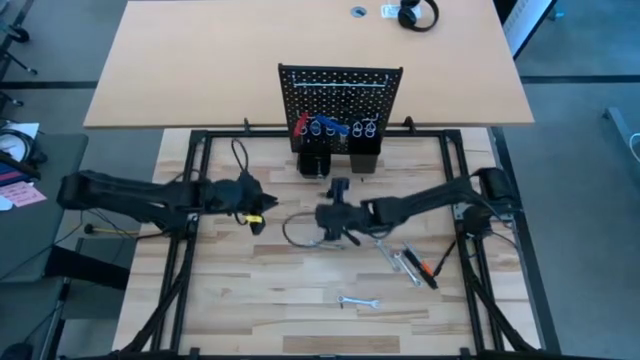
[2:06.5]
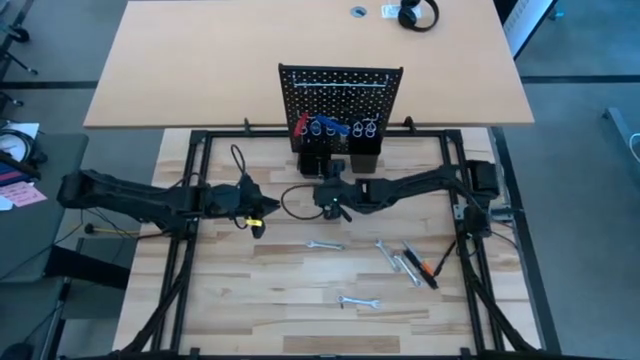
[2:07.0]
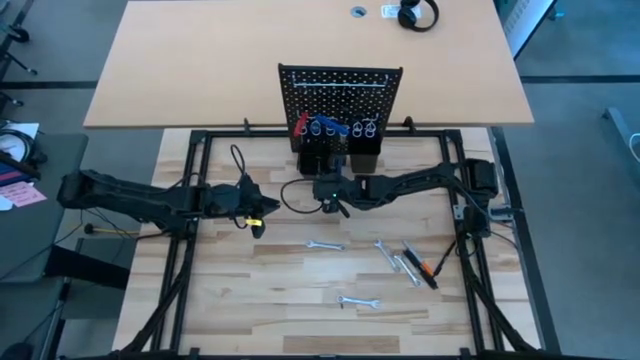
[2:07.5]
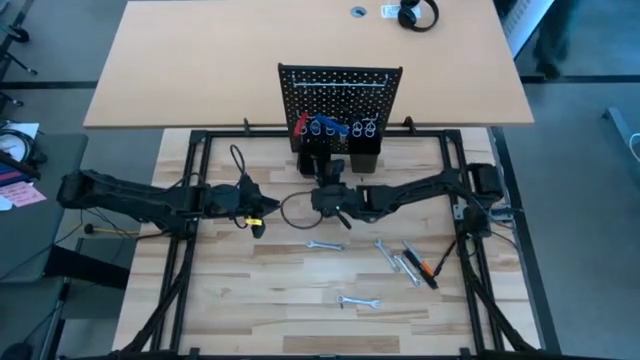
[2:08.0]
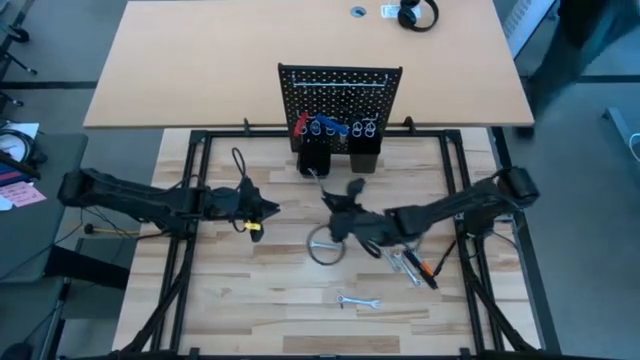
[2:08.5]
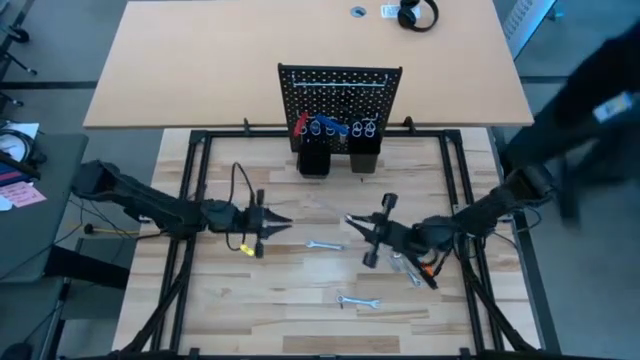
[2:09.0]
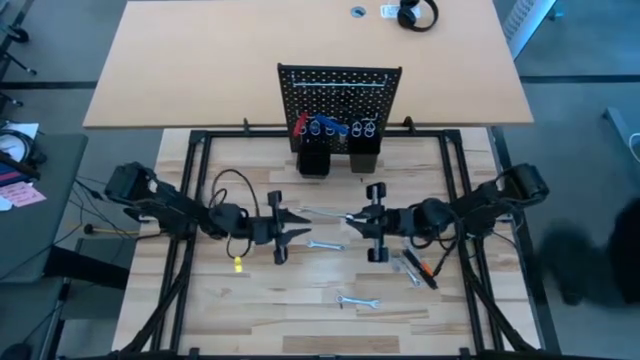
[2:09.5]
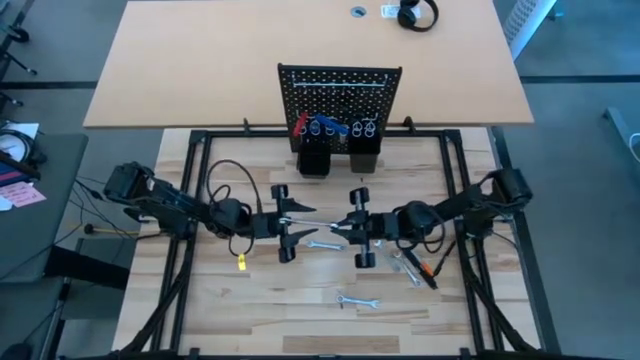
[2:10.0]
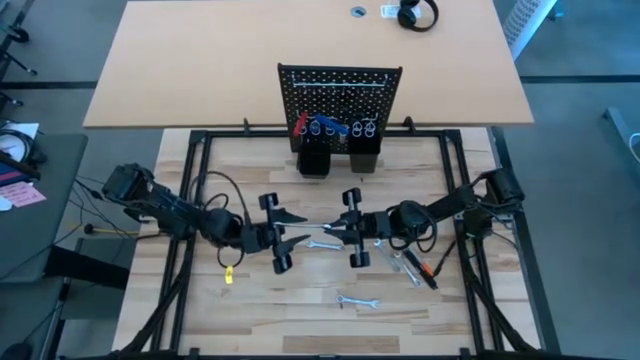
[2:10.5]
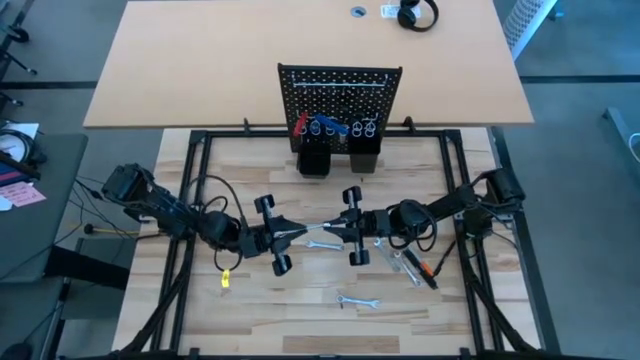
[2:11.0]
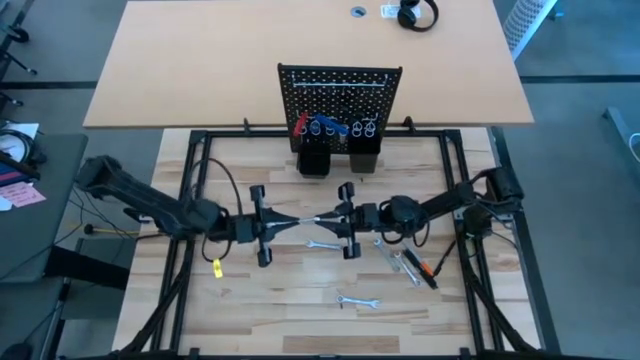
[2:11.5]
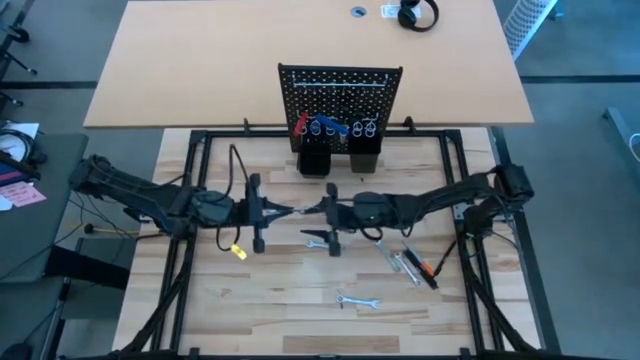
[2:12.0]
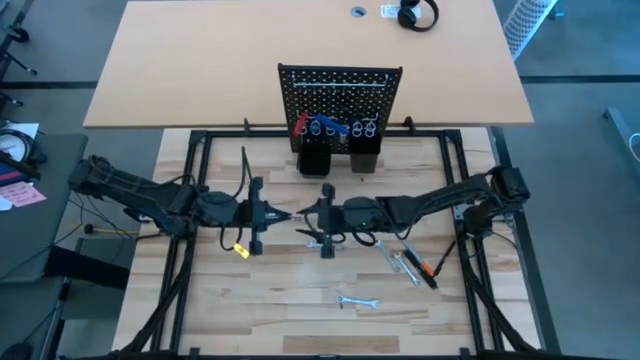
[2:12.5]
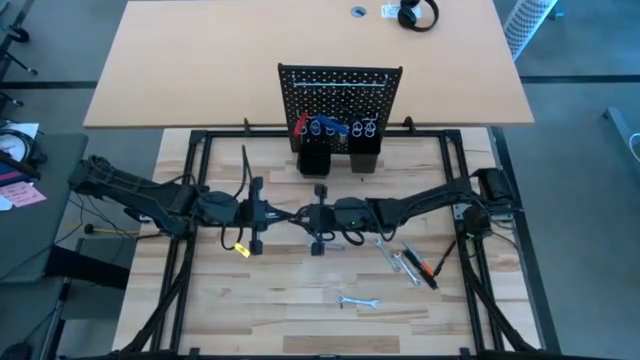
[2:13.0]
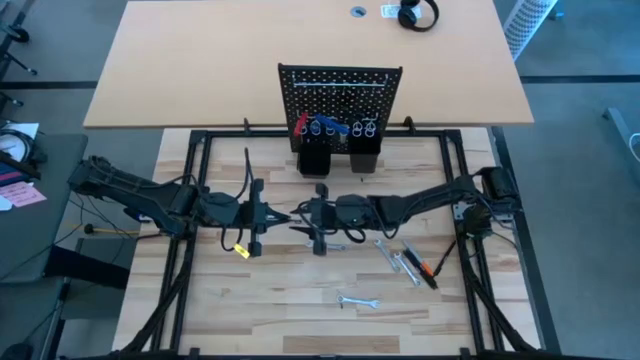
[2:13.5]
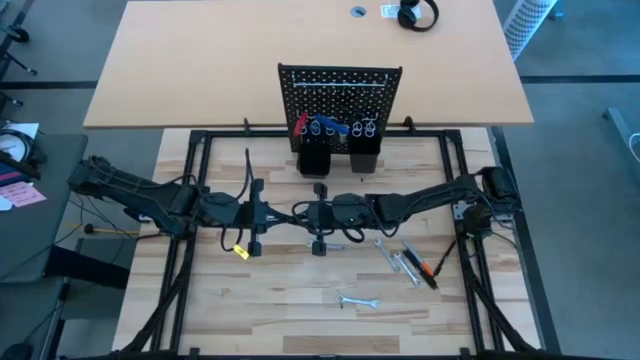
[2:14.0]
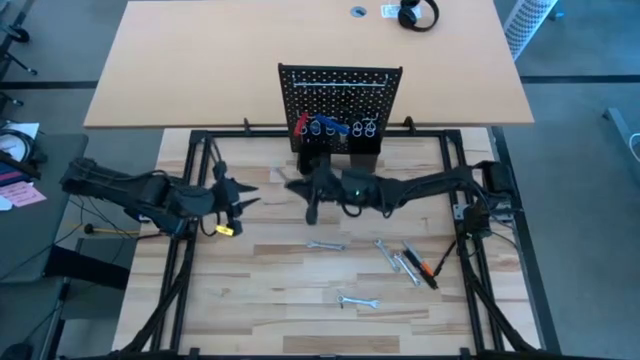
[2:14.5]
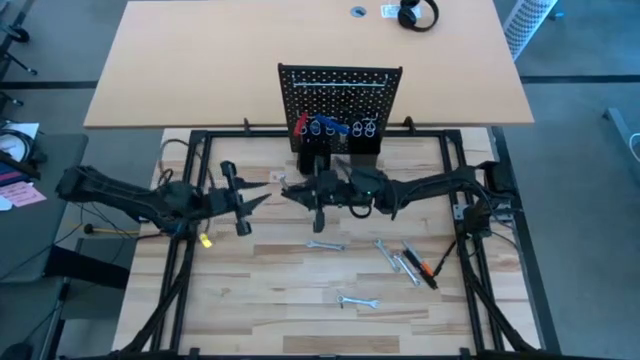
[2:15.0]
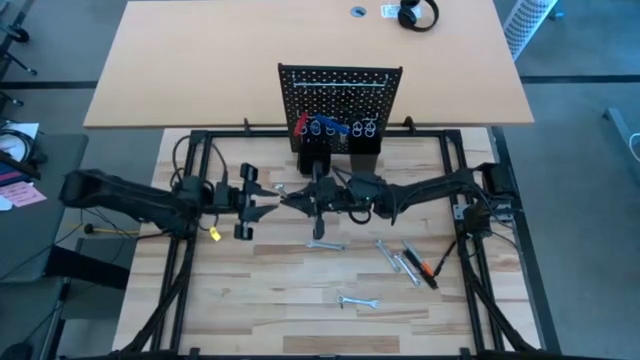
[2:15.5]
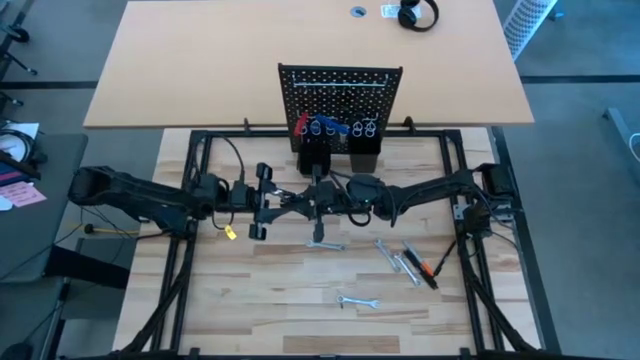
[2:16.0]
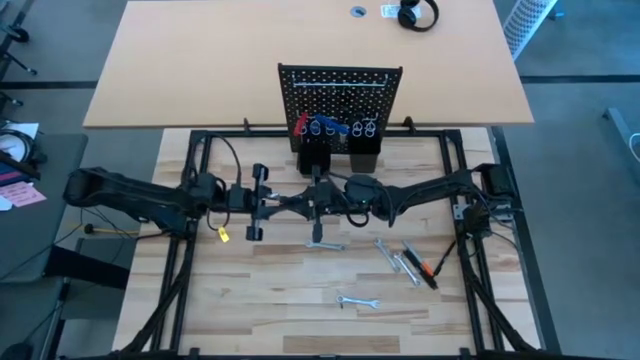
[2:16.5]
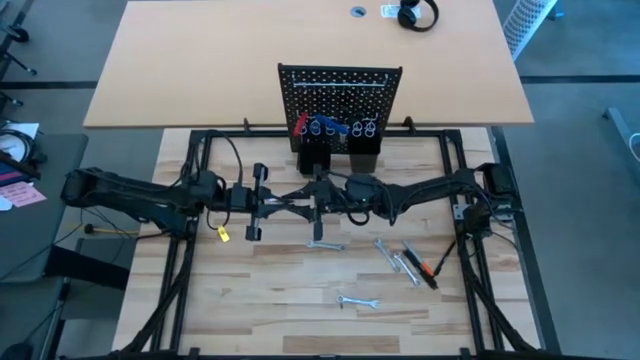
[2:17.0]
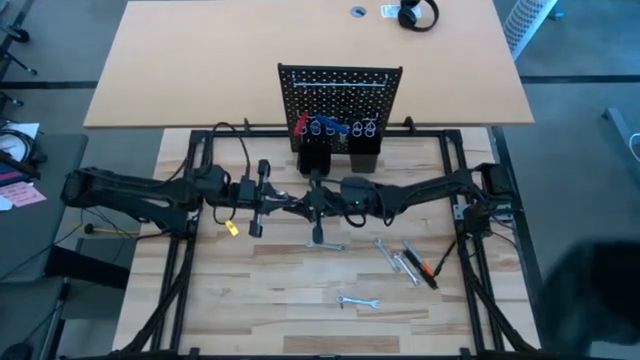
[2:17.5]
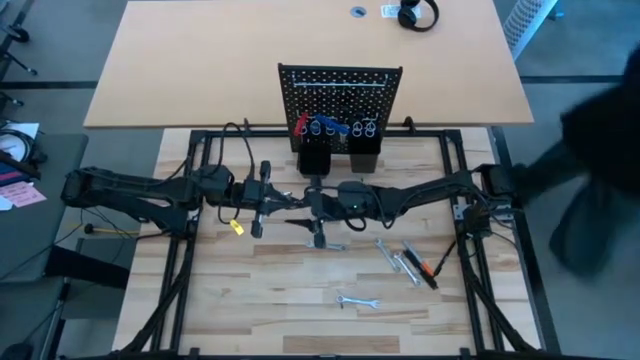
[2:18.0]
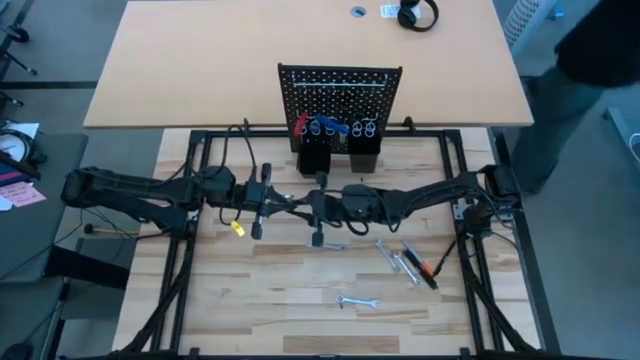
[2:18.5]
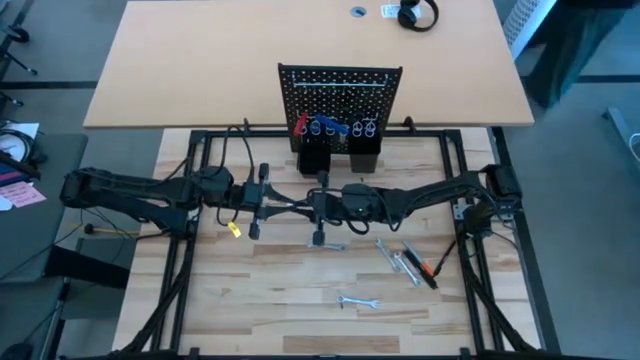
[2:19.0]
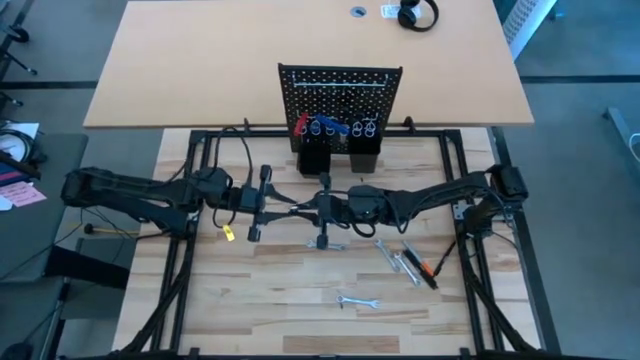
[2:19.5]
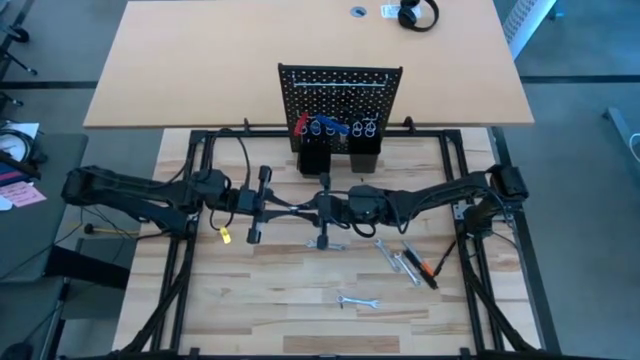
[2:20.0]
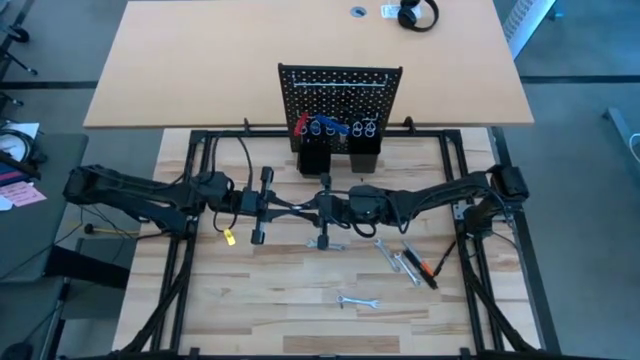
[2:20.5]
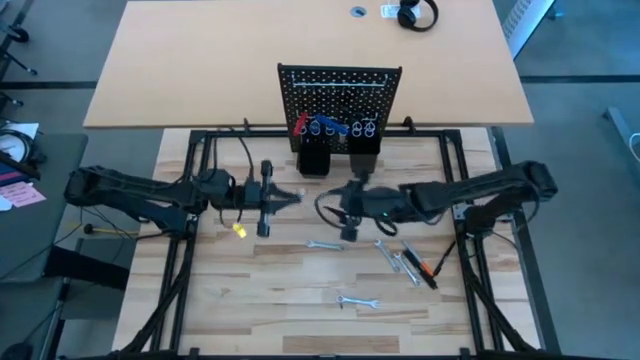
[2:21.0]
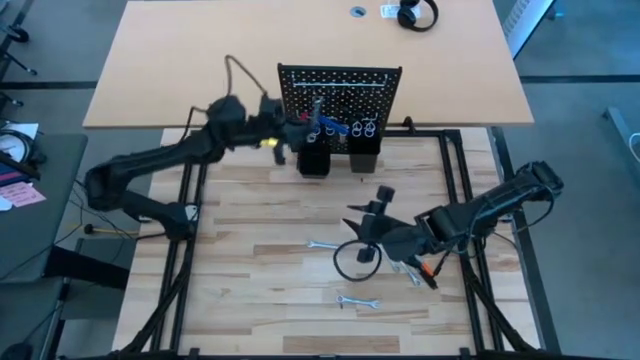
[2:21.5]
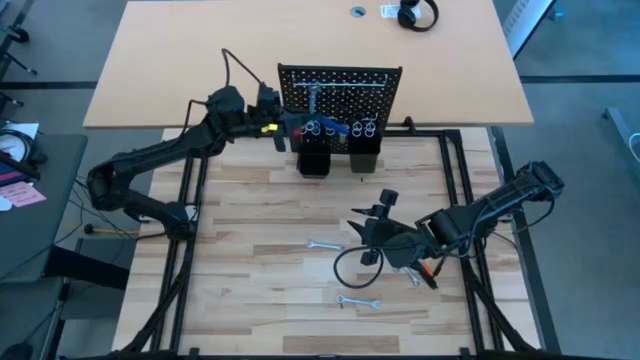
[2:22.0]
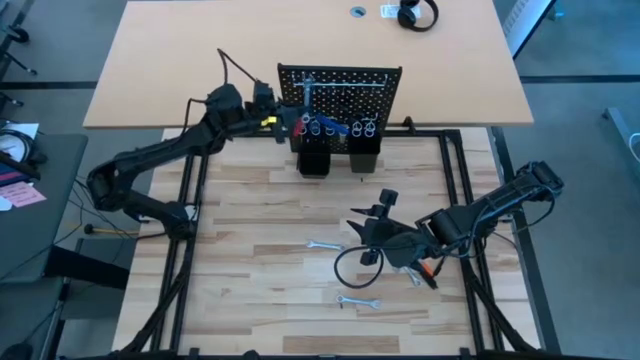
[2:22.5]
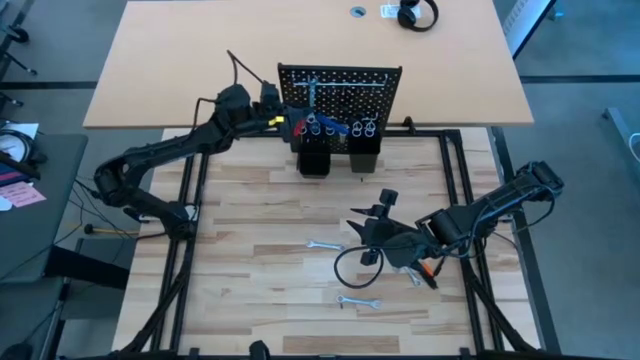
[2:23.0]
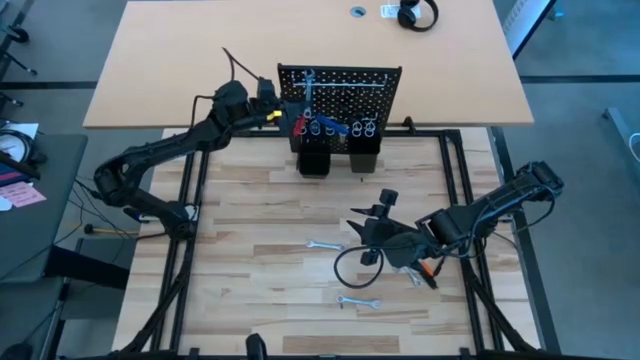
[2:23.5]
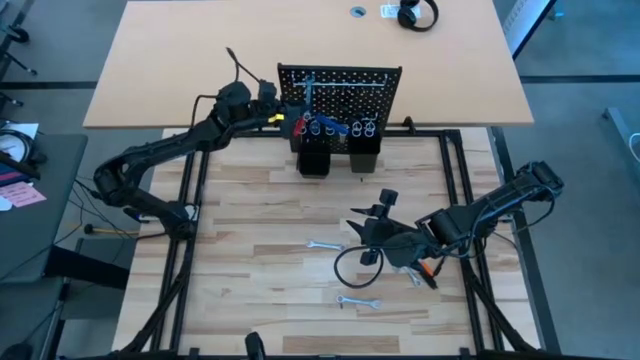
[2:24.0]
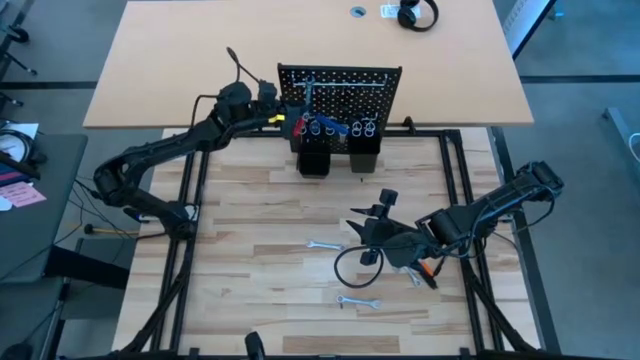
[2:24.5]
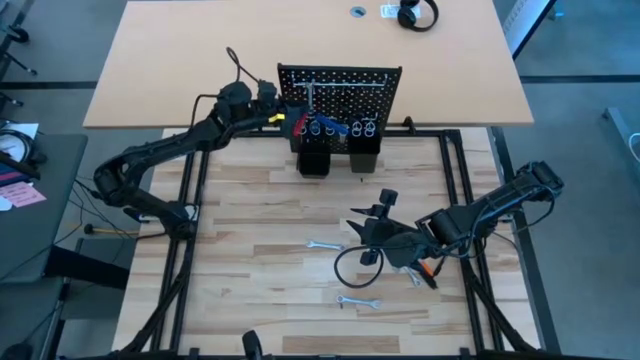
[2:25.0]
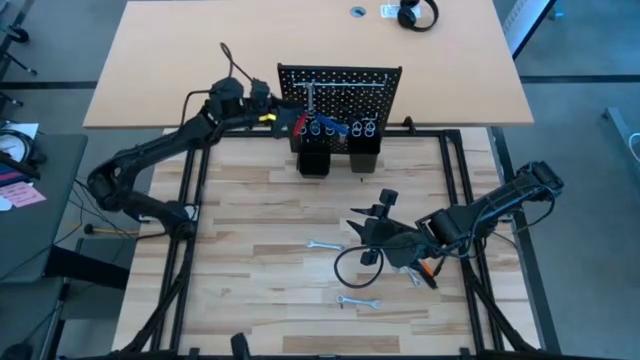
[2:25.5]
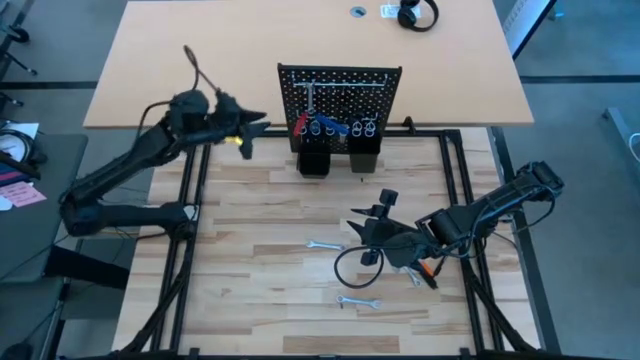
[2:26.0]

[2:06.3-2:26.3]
Task: Hang tools onto peg board
Hang the wrench on the pegboard
